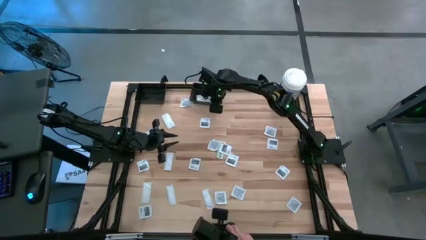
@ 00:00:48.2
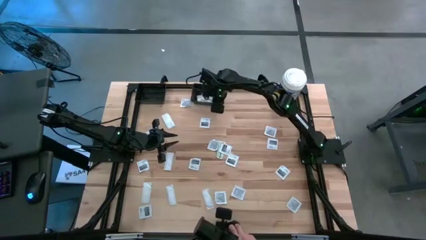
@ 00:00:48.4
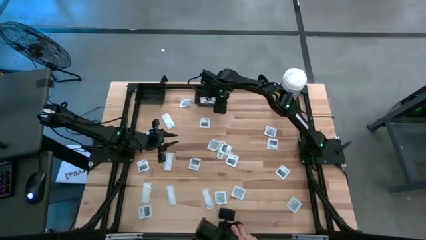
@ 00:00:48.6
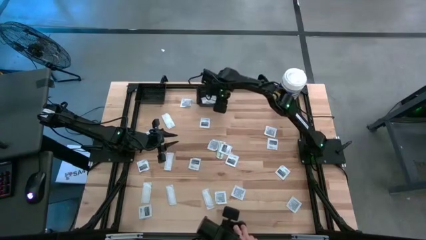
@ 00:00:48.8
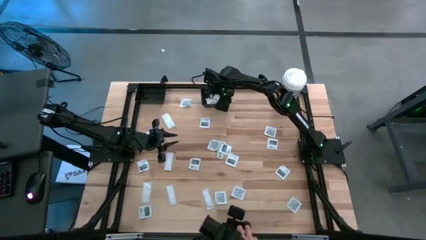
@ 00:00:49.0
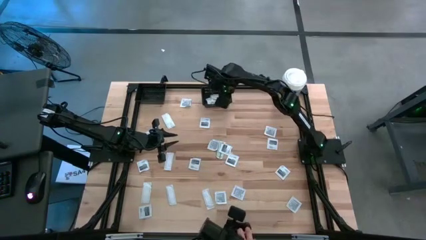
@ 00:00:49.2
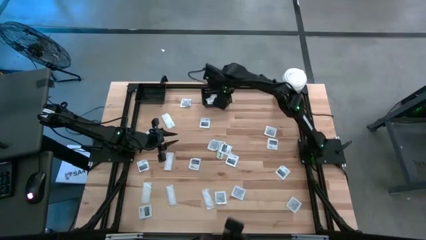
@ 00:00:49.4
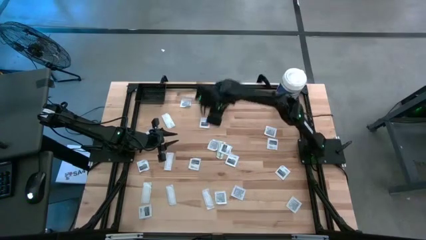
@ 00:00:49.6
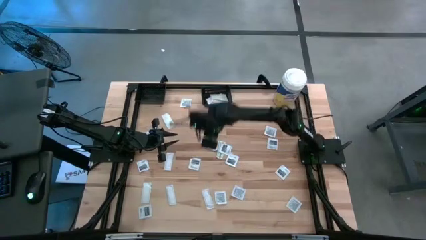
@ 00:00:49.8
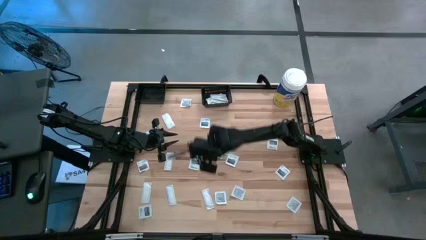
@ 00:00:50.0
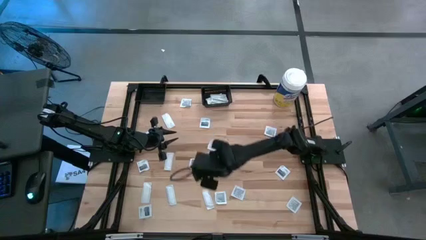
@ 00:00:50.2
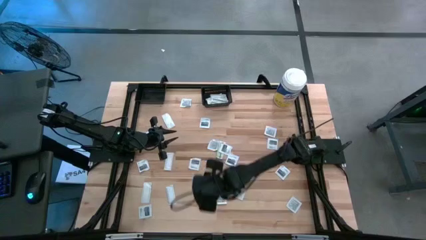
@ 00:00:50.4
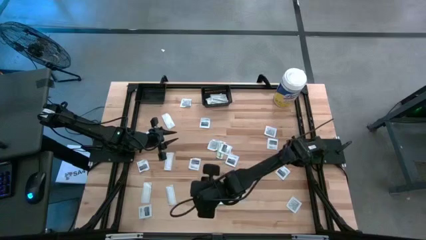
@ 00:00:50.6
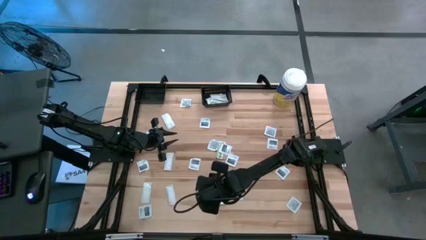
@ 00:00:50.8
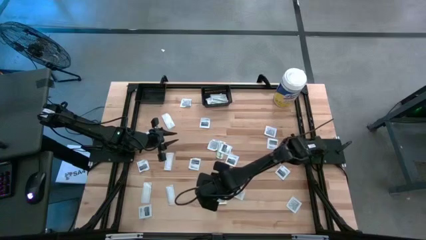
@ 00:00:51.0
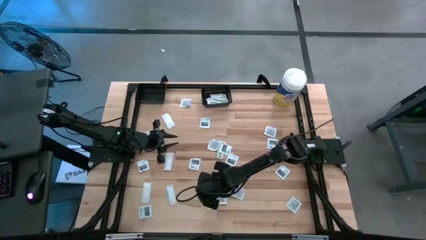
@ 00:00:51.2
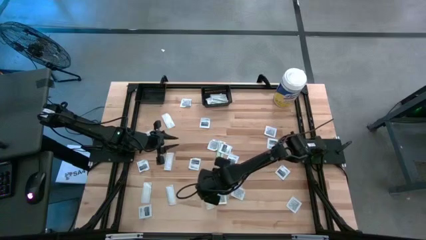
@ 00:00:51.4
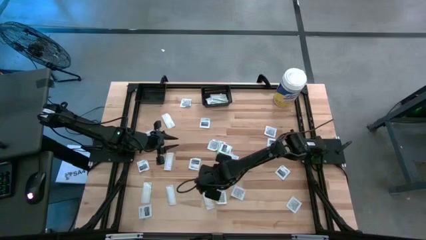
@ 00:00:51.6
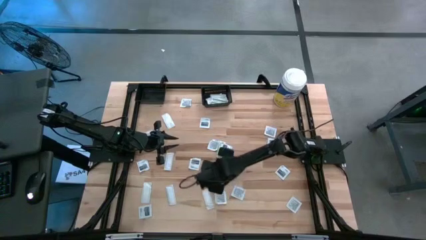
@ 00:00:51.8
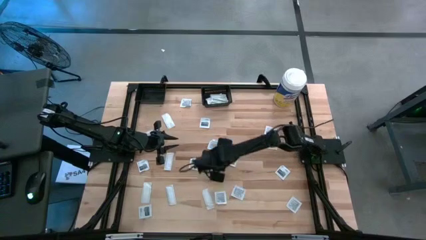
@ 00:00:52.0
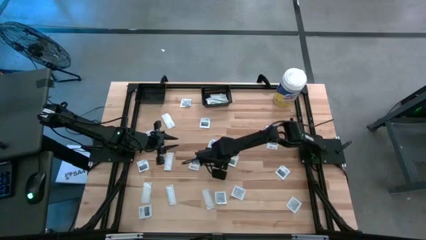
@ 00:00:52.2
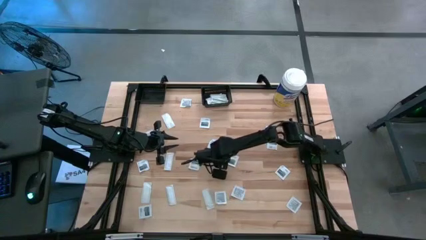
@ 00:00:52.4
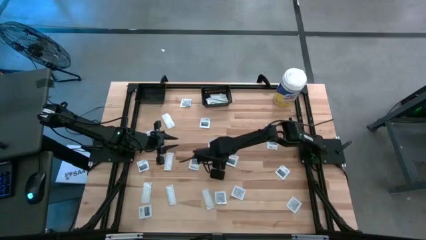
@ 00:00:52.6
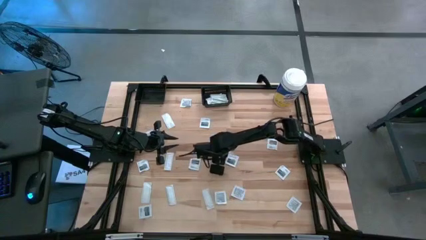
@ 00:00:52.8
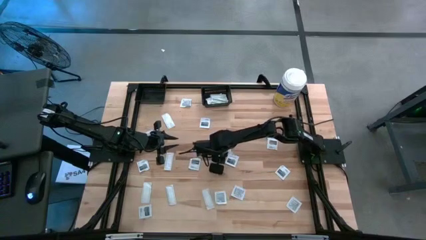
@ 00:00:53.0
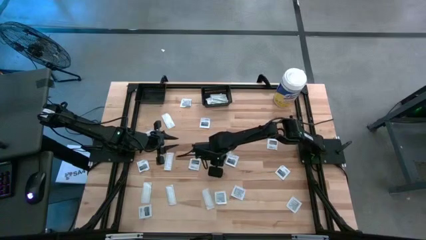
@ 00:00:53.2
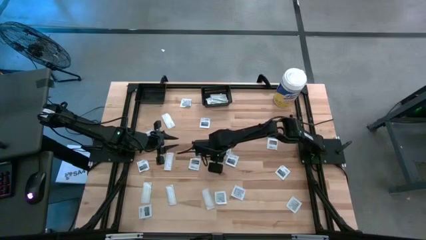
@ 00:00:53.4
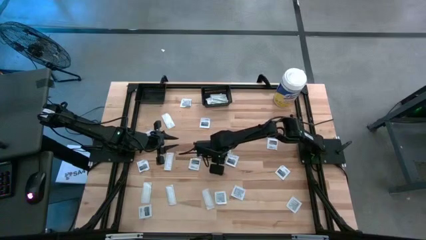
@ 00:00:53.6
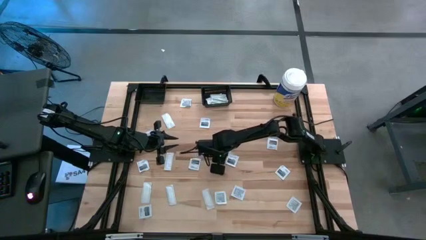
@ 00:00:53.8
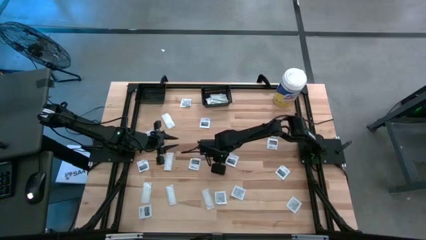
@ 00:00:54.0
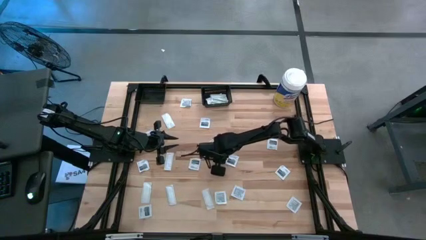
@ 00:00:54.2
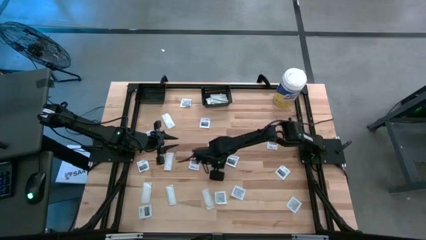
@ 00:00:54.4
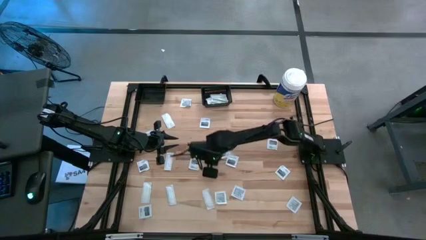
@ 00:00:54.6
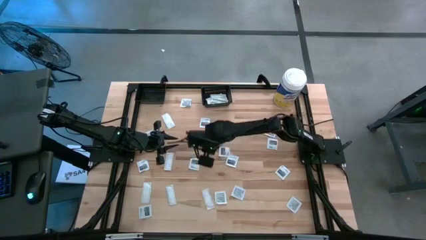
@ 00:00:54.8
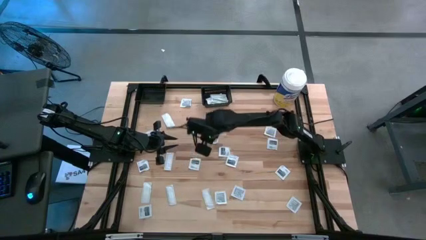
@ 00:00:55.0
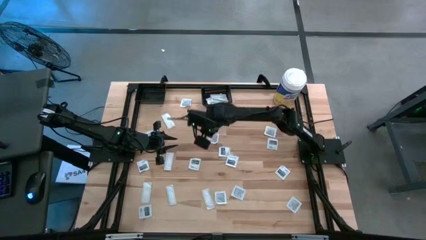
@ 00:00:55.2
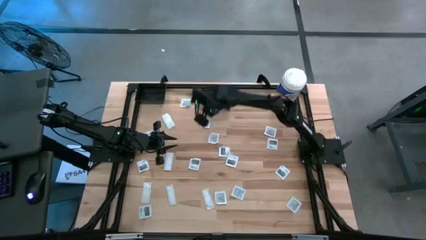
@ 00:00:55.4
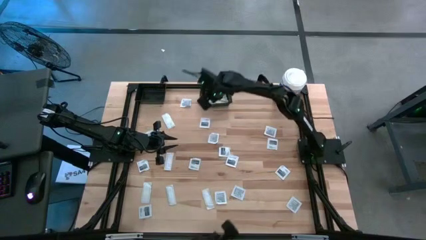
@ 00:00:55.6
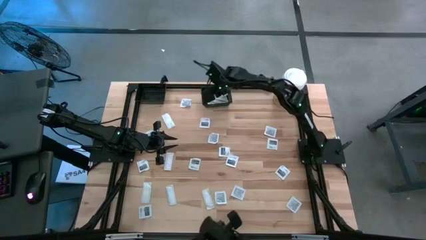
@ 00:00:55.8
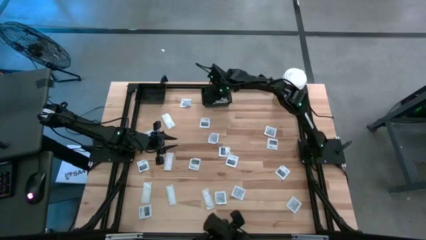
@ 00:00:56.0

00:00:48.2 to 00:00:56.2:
Task: Pick & Place First Aid Supplies
Put the green bandage pack into the right black bin

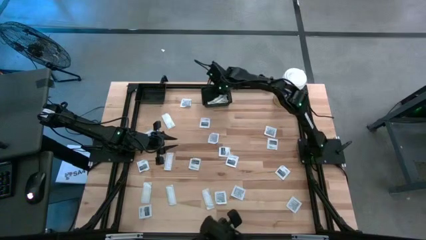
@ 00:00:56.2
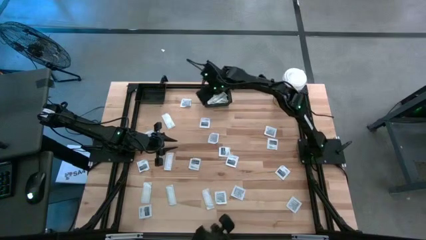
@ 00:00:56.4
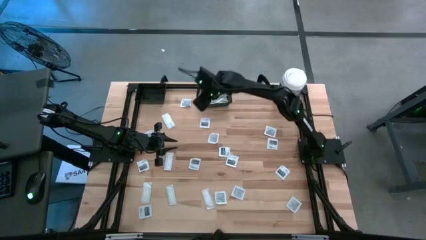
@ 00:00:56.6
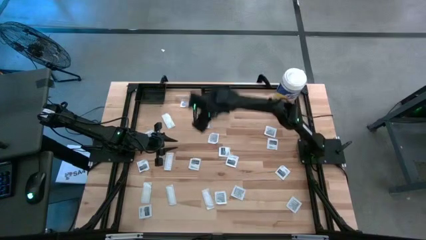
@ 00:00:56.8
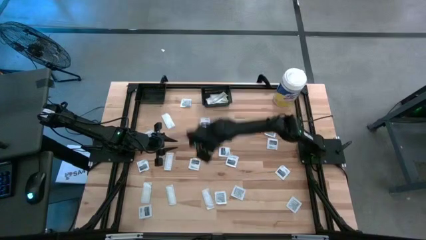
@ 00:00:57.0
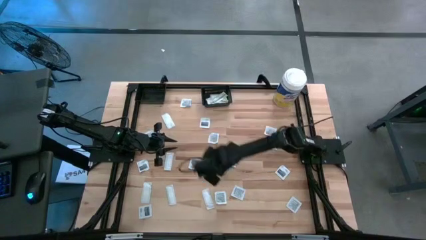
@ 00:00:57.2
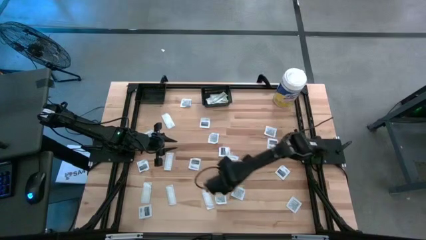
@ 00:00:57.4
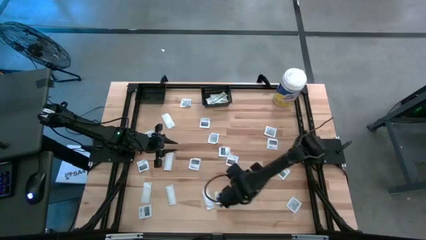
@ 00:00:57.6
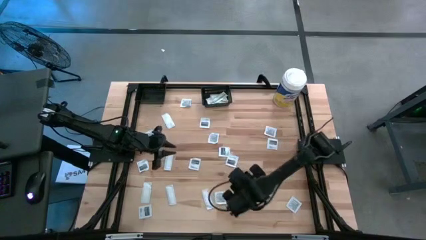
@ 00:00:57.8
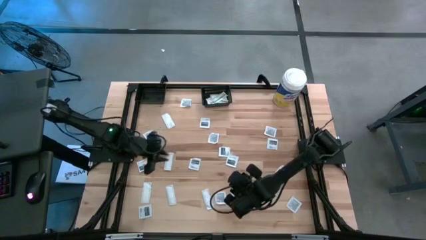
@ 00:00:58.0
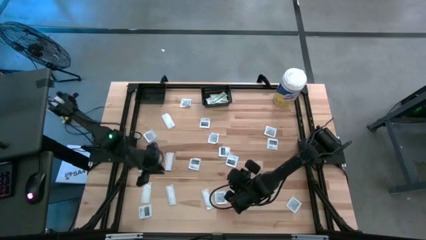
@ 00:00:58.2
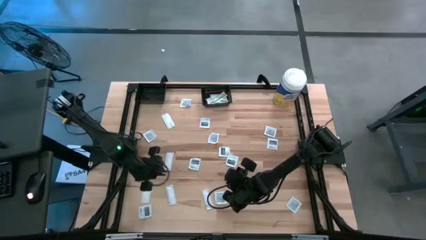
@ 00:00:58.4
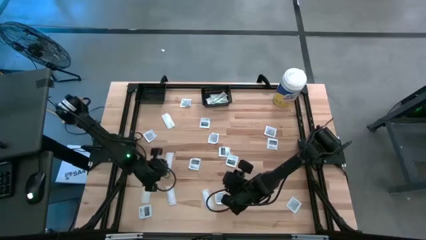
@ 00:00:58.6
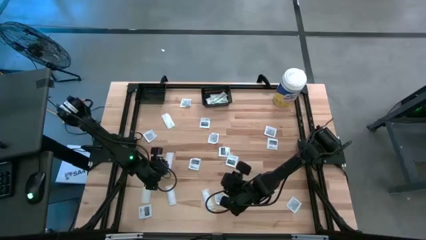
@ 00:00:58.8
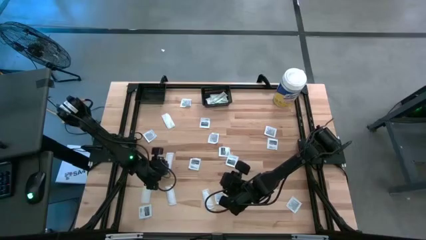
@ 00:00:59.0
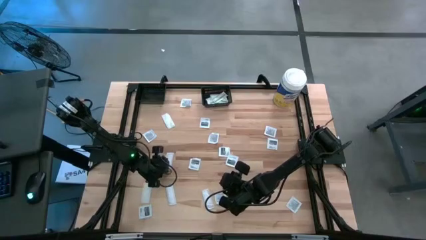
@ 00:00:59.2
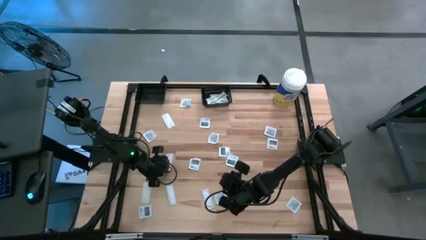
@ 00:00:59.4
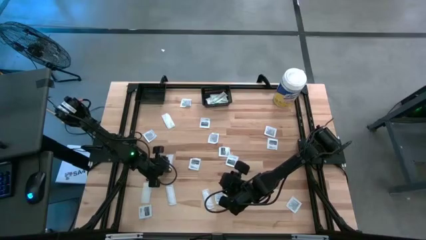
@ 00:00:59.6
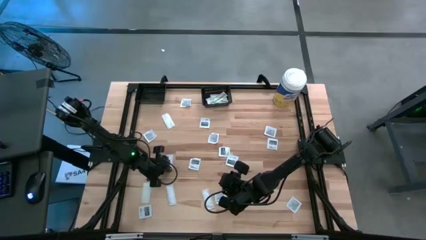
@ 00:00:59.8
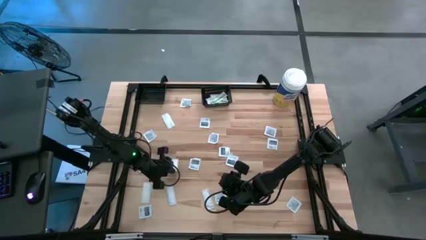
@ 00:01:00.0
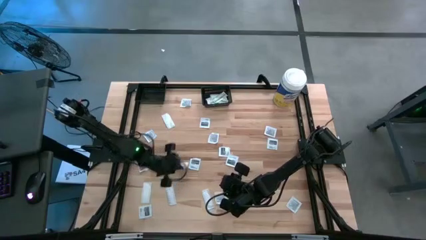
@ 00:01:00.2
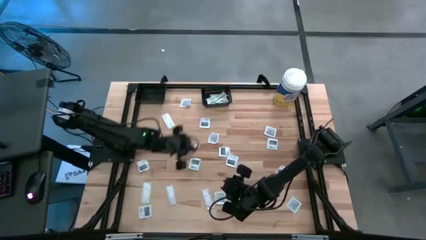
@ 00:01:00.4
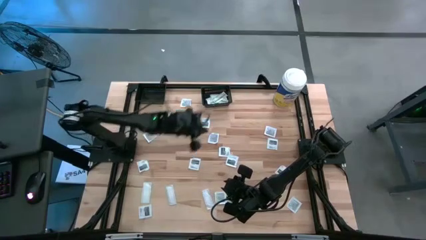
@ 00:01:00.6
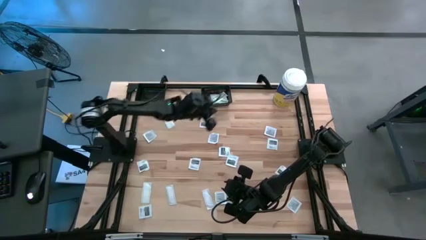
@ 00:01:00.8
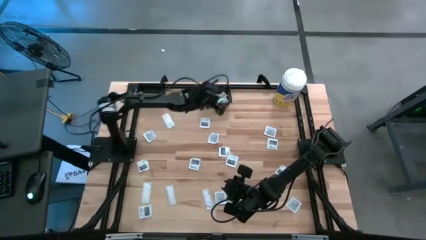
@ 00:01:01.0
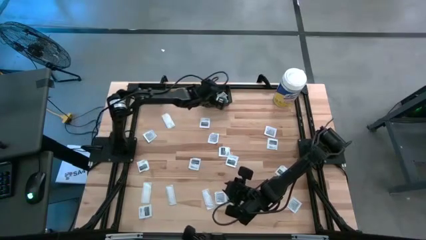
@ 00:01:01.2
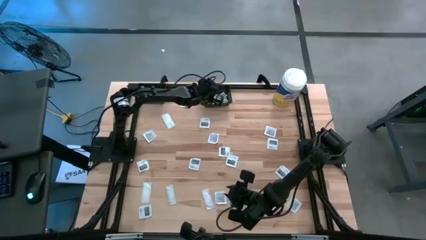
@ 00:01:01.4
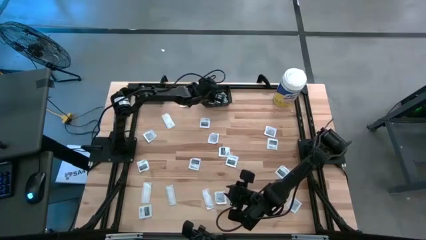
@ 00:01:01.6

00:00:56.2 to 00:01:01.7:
Put the green bandage pack into the right black bin

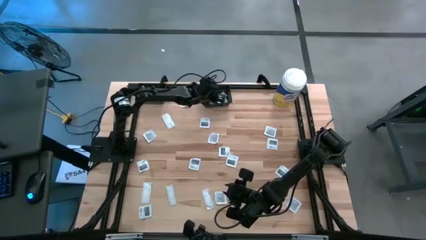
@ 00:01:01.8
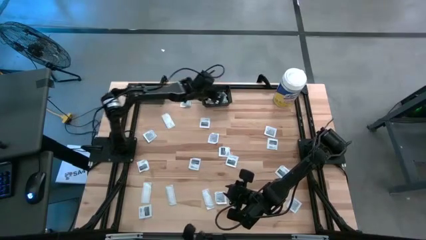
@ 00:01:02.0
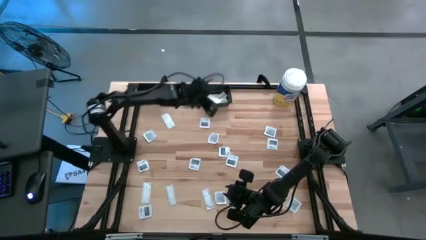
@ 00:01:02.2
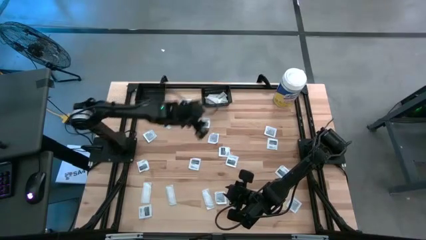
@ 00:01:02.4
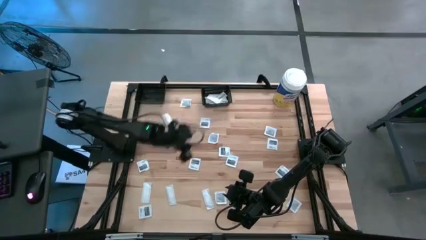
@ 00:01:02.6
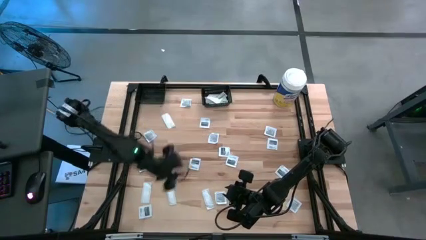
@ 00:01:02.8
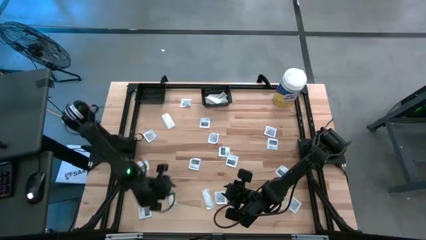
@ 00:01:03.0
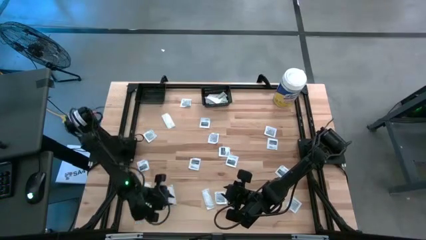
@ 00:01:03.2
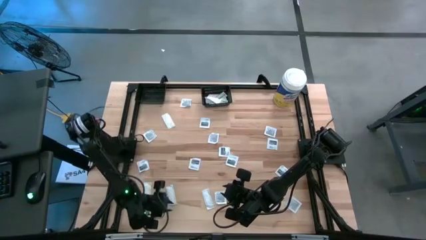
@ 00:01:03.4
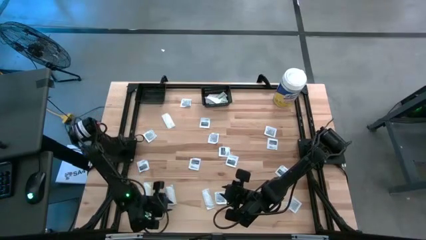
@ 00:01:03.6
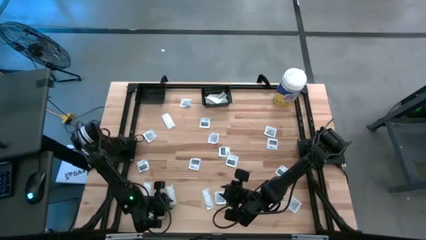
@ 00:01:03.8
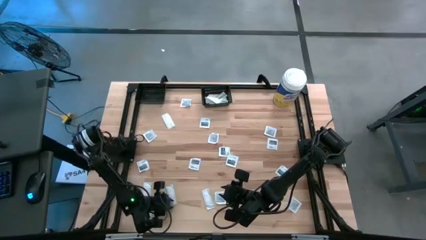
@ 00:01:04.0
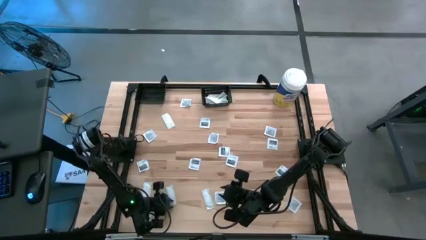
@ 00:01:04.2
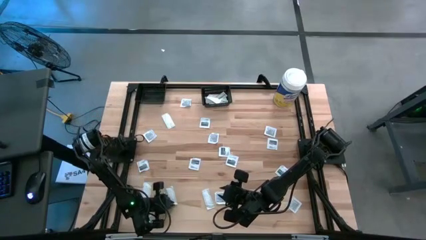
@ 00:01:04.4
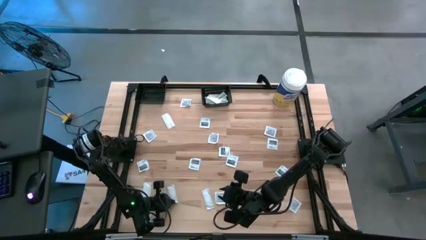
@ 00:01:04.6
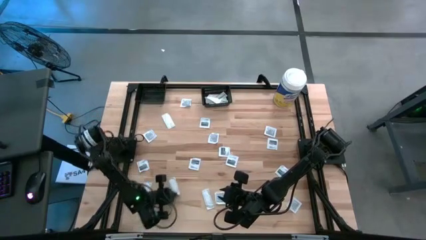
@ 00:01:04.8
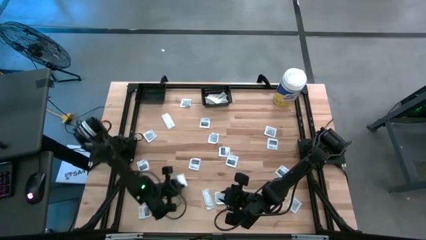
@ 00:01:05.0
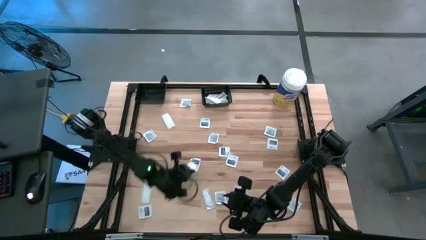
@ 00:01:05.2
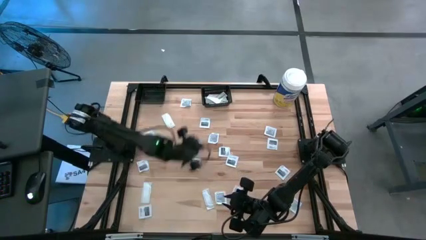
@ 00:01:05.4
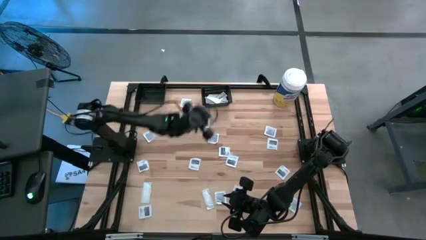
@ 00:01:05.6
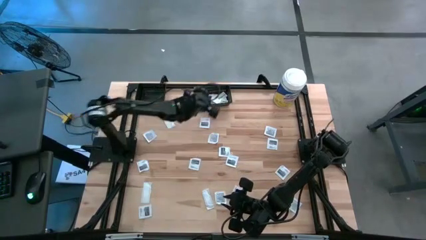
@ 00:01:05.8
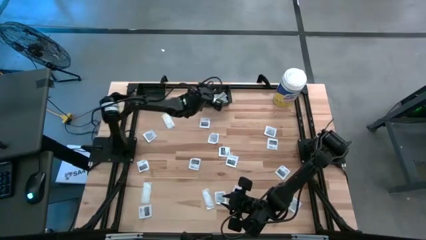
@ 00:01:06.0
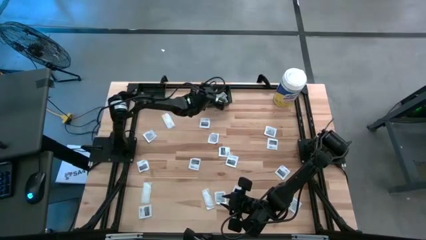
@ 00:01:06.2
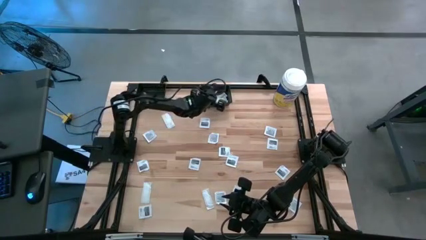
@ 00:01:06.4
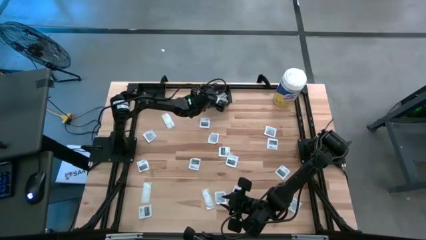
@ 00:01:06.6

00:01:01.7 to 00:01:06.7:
Put the green bandage pack into the right black bin
